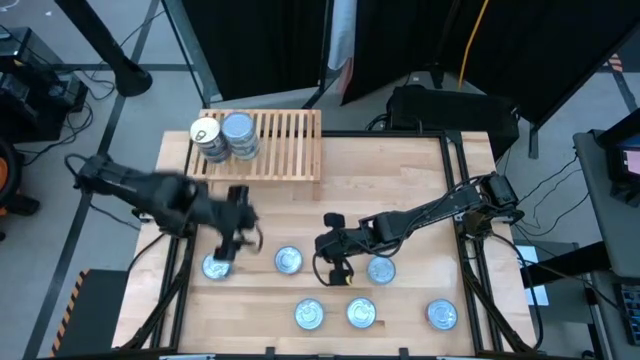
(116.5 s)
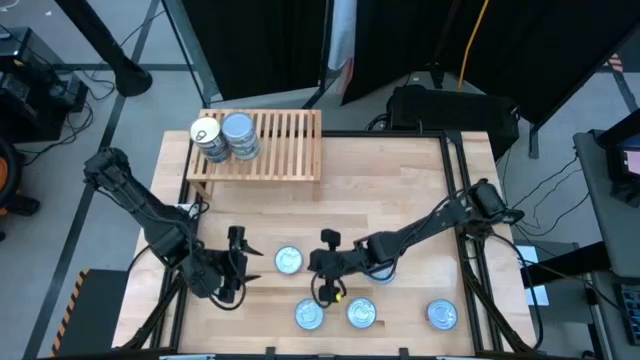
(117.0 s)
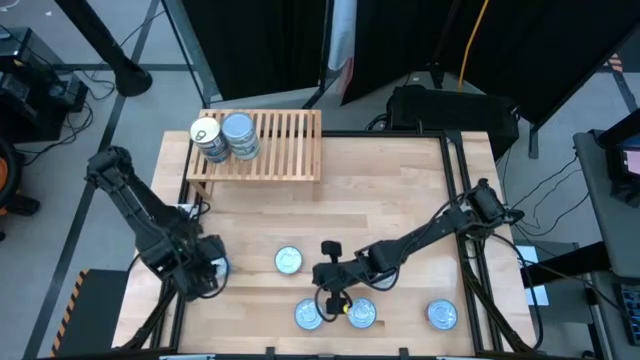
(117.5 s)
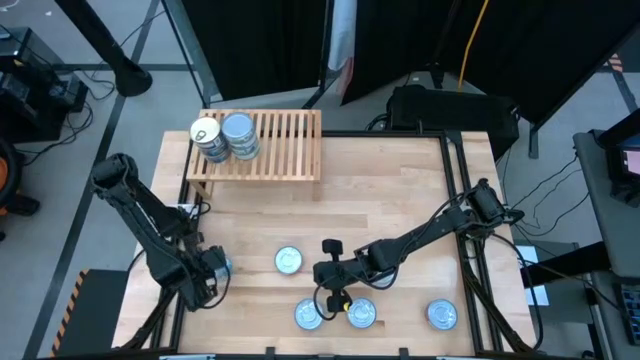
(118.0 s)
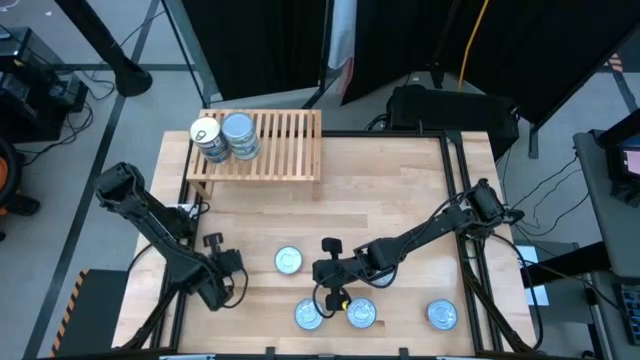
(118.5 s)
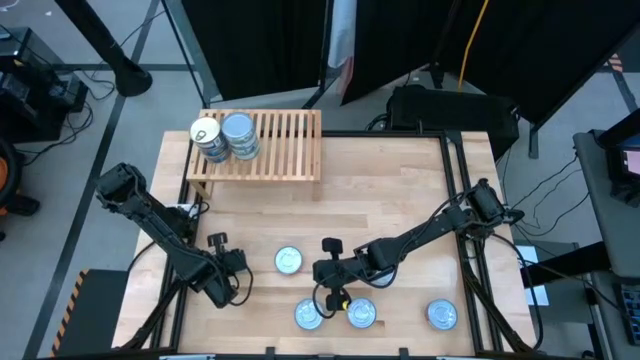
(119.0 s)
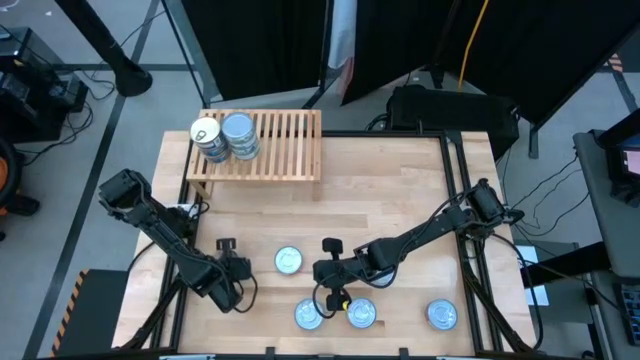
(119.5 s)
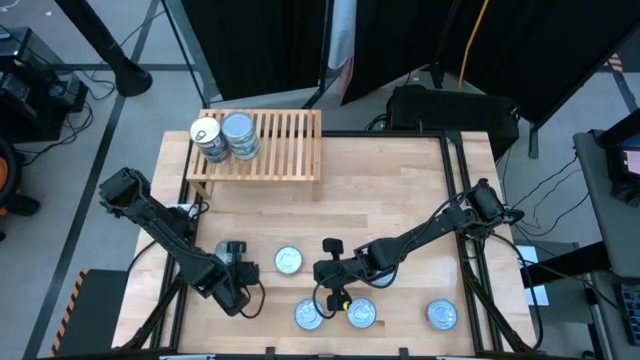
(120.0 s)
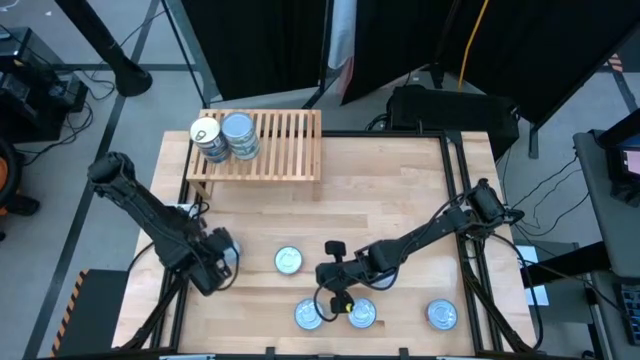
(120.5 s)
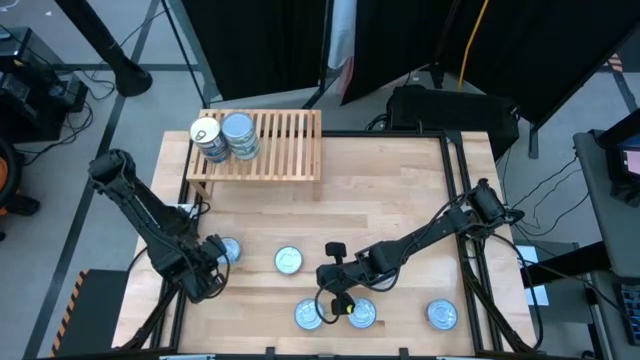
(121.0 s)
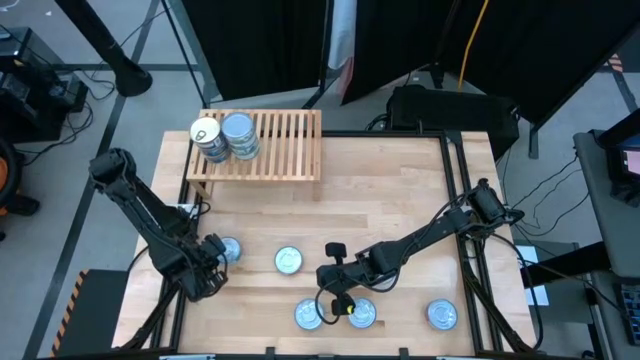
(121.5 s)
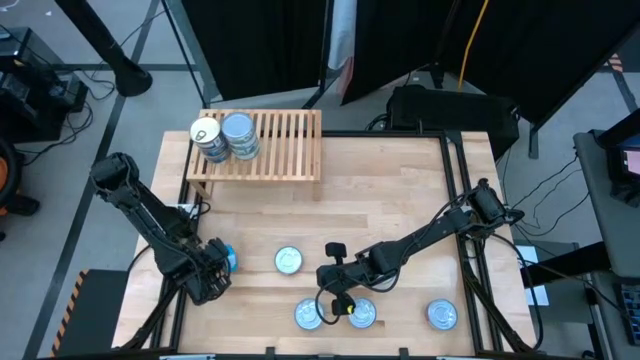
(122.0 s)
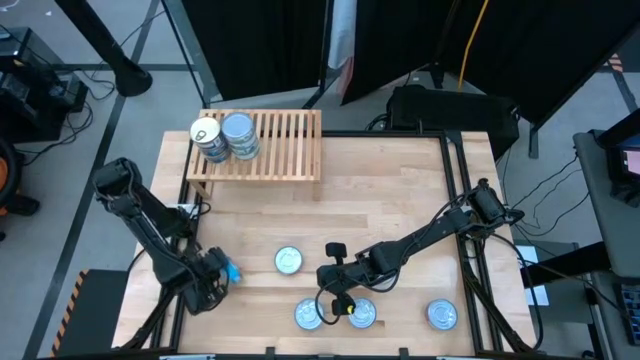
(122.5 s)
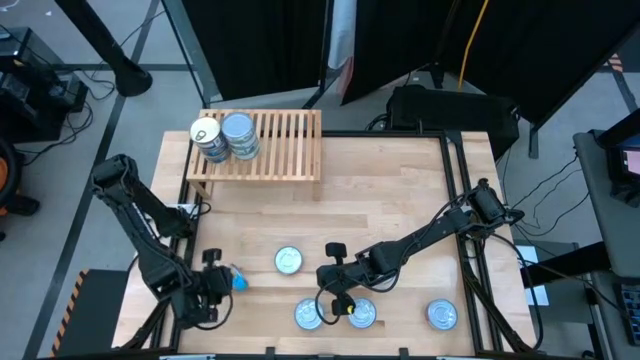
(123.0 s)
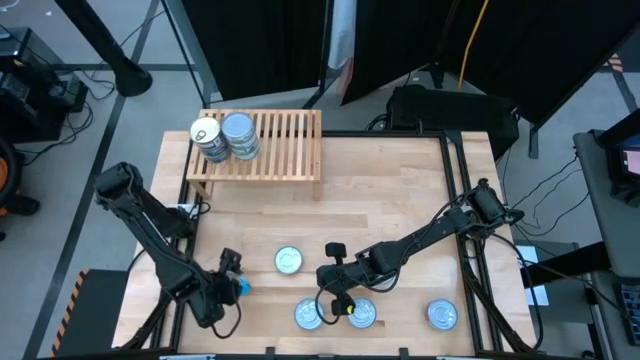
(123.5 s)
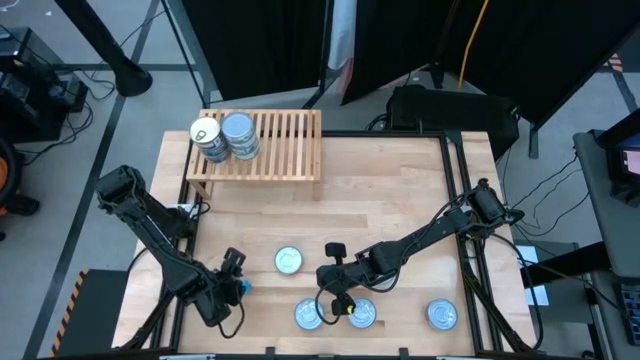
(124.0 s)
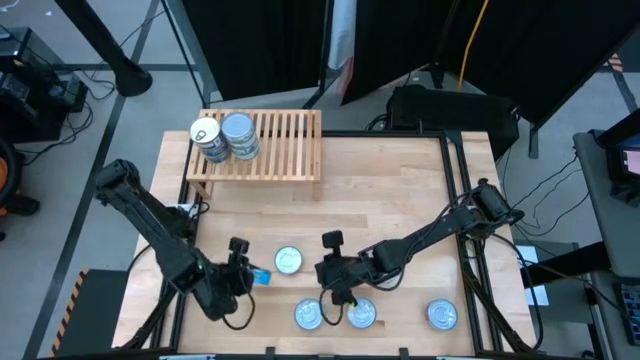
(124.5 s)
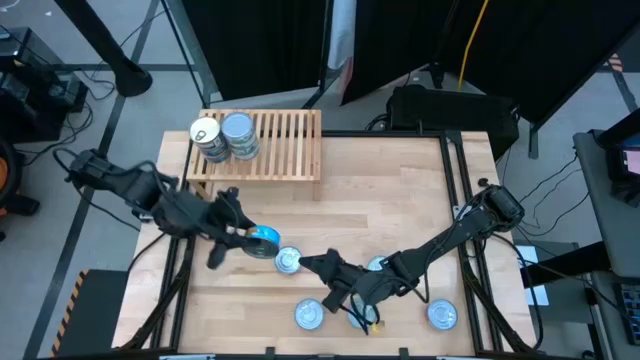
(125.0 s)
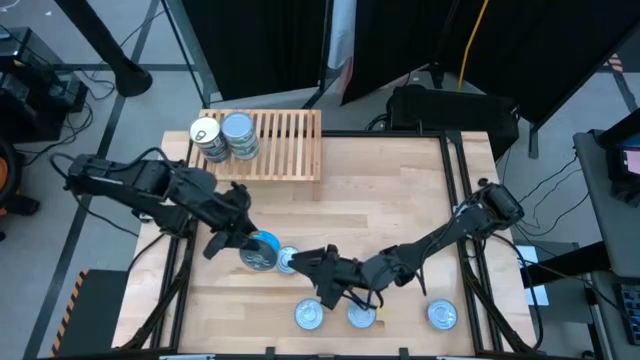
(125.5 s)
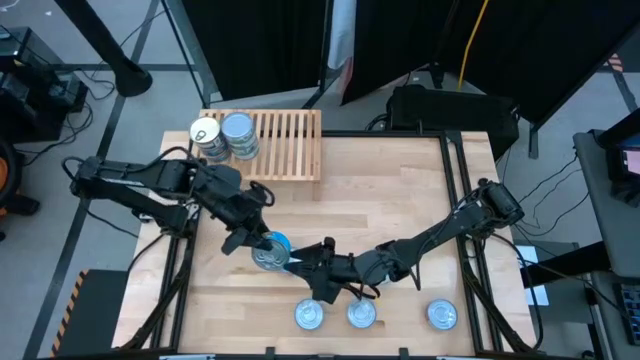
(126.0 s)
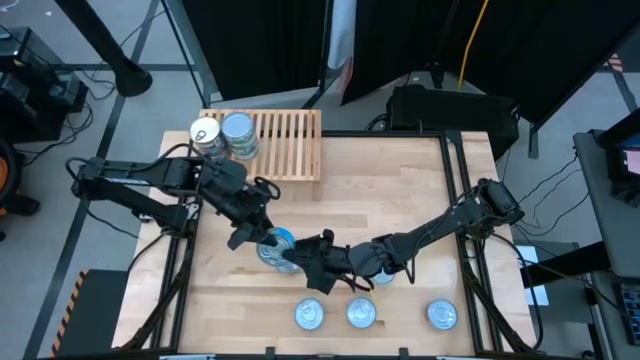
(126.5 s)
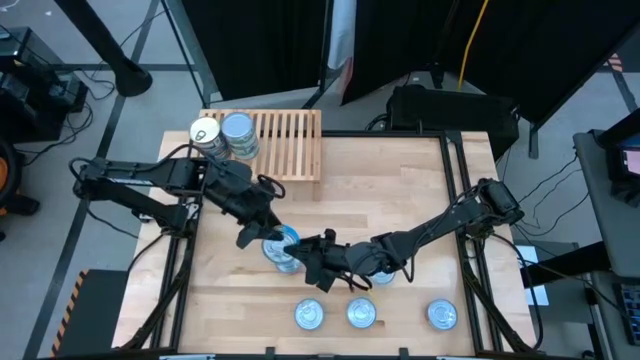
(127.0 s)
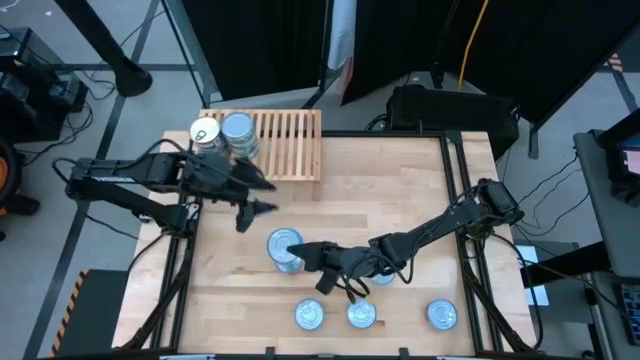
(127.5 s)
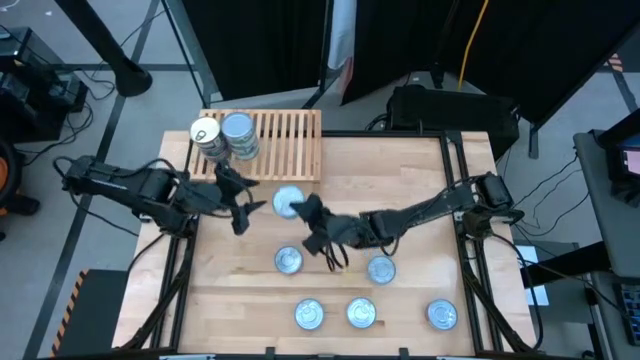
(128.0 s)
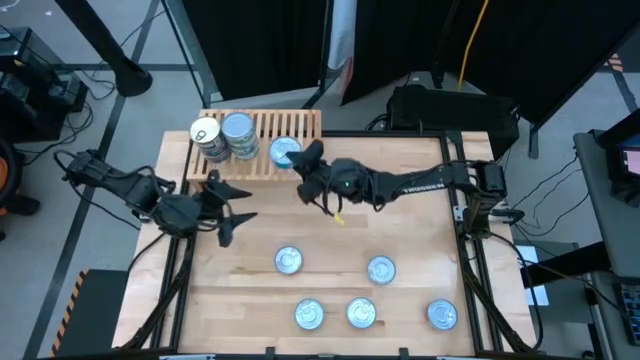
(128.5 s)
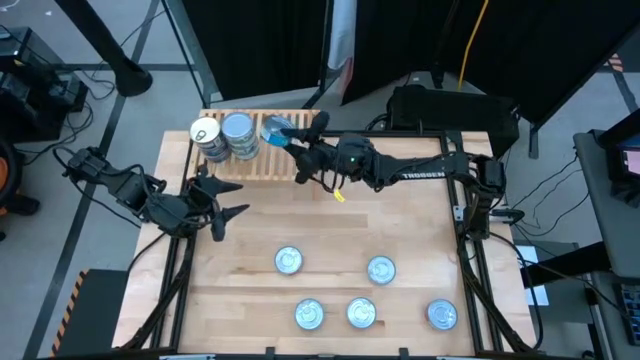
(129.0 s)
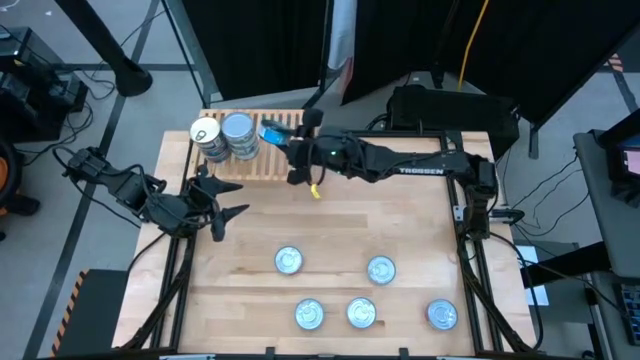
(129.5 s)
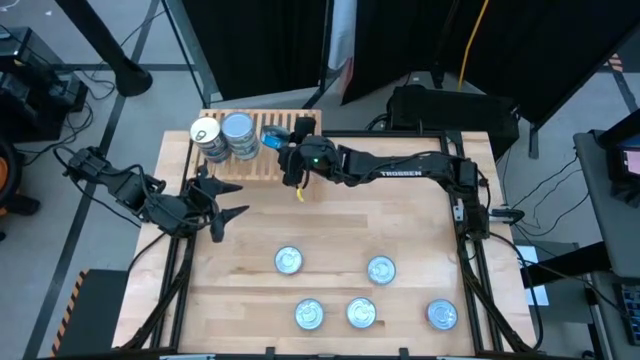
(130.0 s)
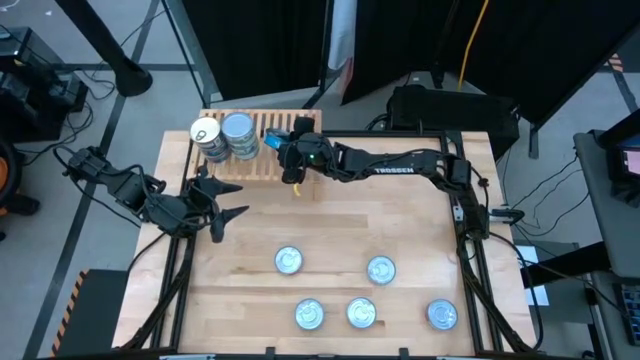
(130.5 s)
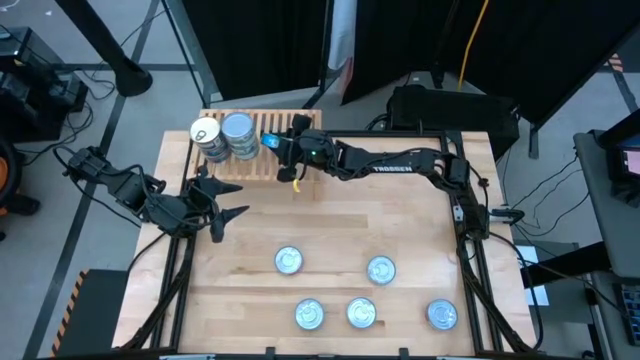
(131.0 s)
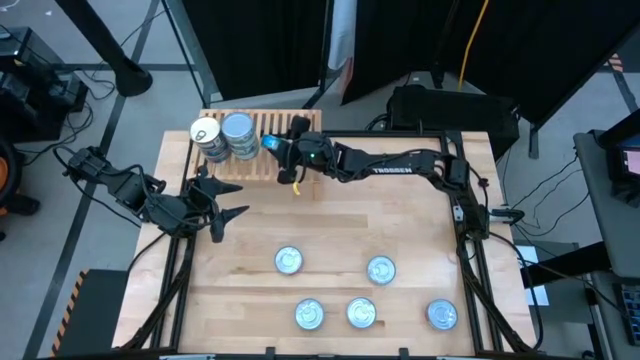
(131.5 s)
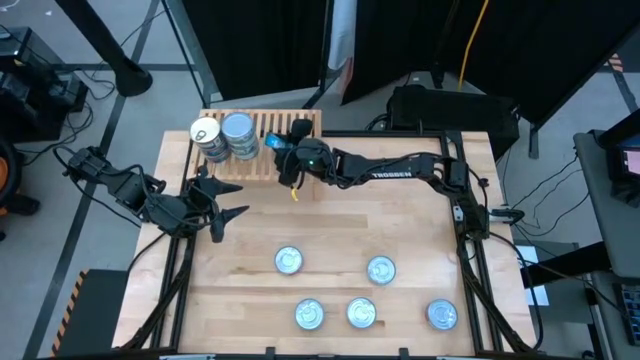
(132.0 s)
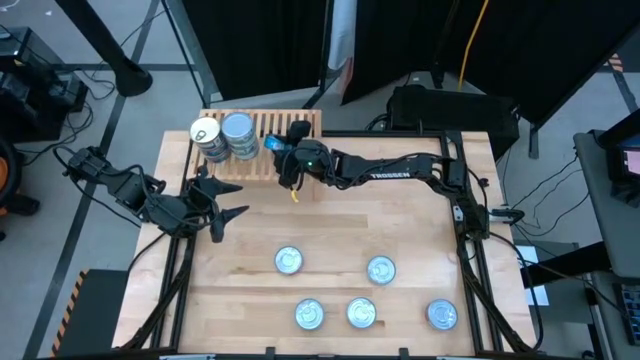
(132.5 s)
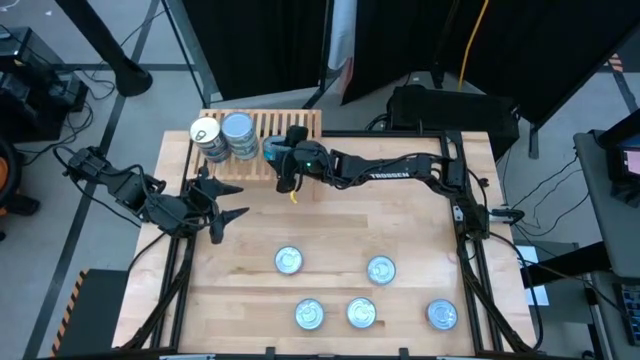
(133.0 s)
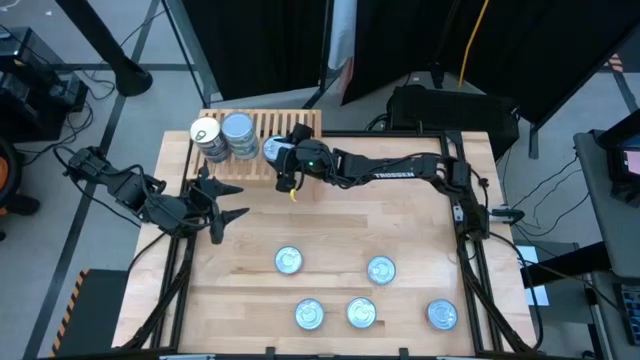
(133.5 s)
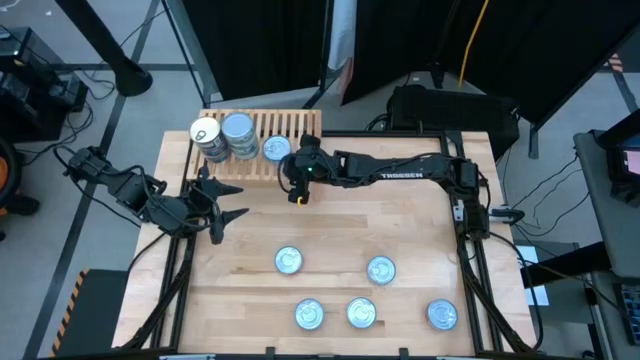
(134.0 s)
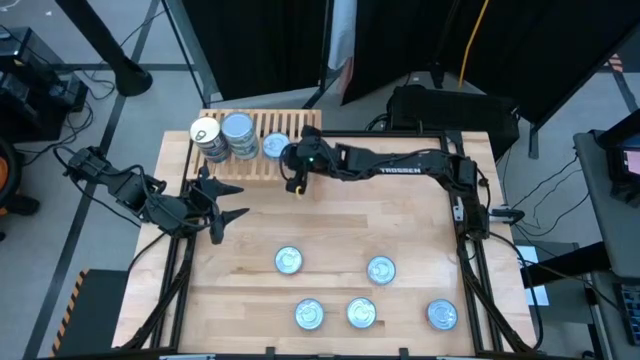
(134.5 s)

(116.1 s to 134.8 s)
Task: Stack canned seafood by type on shelf
Put the top left light blue can on the shelf

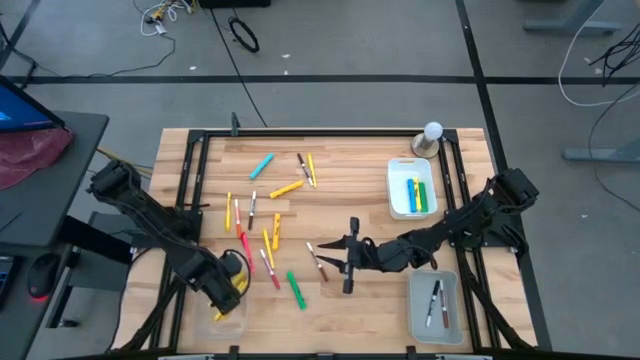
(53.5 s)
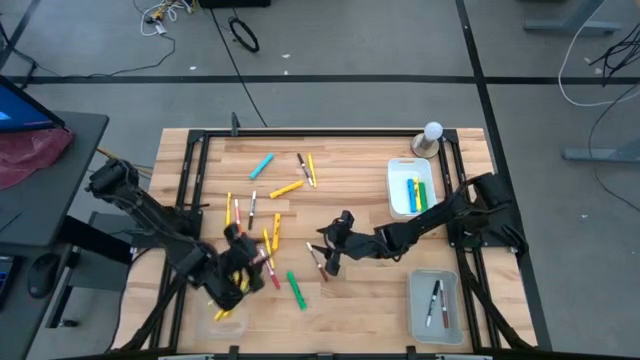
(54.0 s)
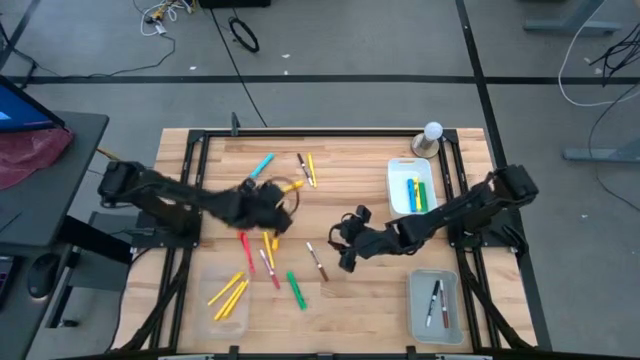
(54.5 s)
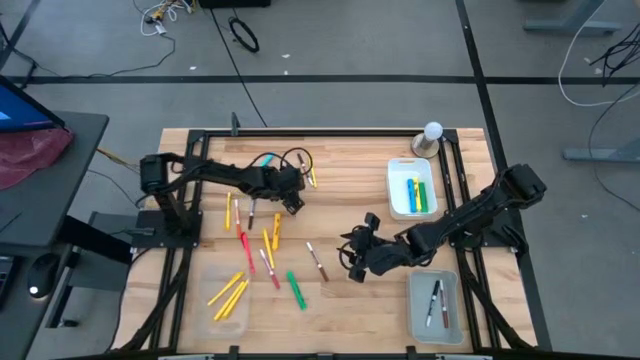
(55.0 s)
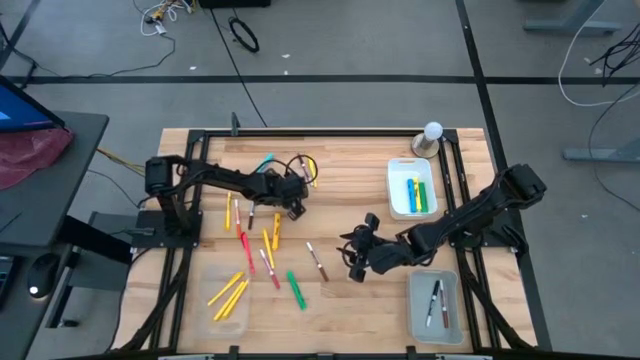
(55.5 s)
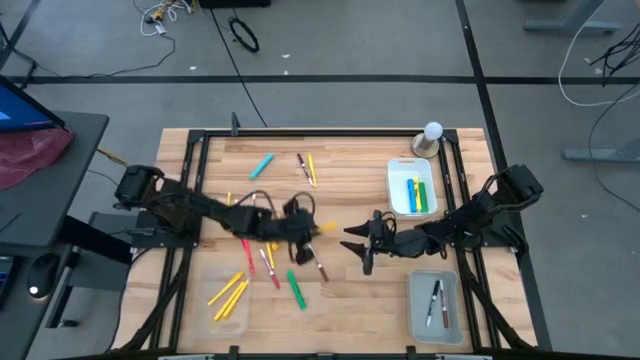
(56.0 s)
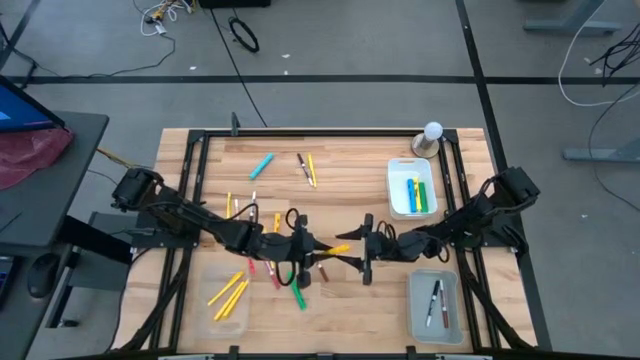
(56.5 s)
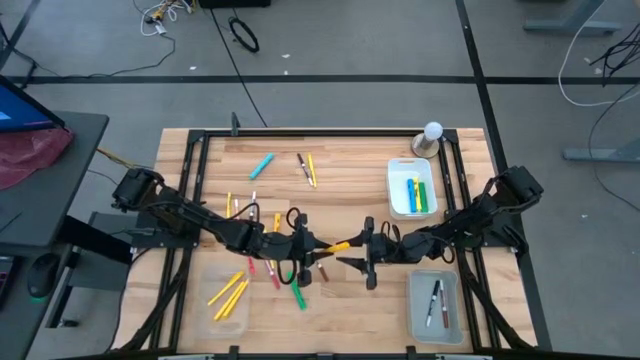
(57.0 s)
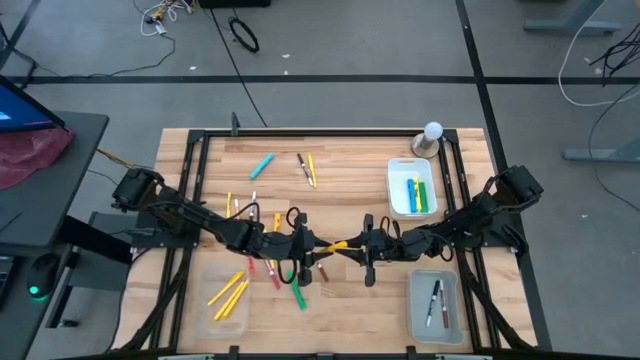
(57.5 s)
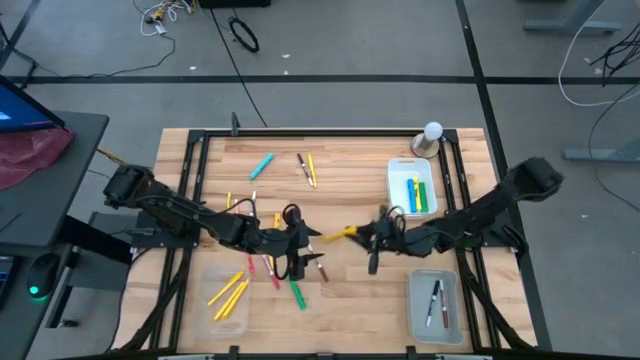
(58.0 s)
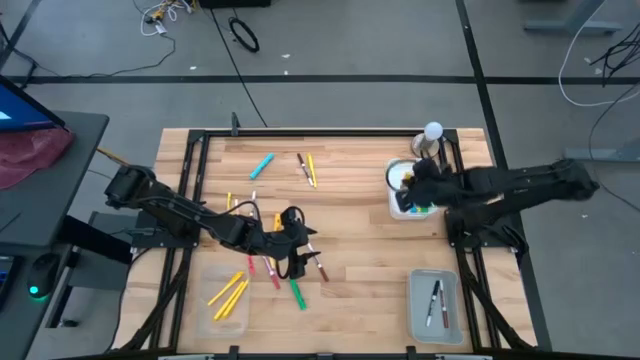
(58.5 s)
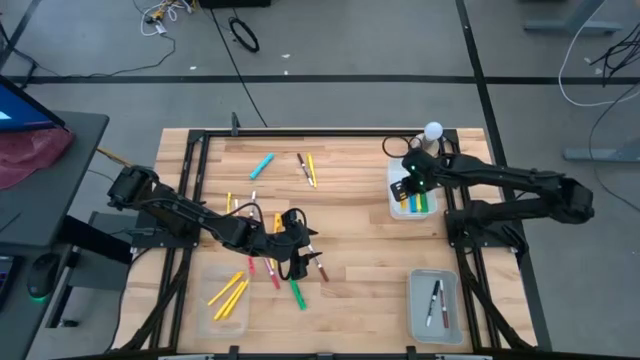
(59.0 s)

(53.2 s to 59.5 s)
Task: Pick & Place Markers
Put the yellow highlighter into the white bin
